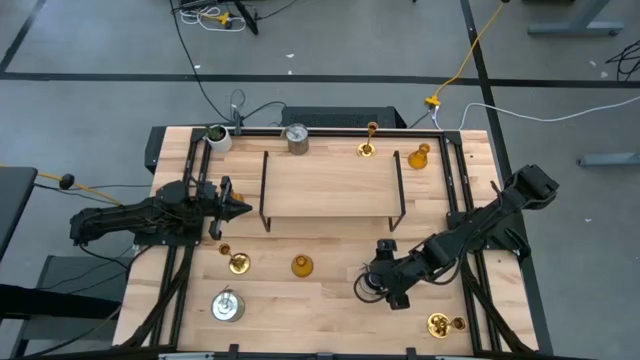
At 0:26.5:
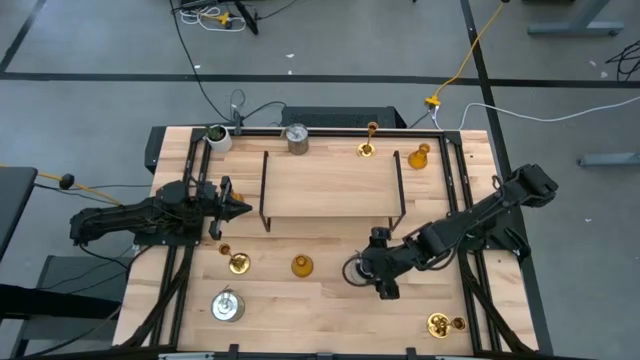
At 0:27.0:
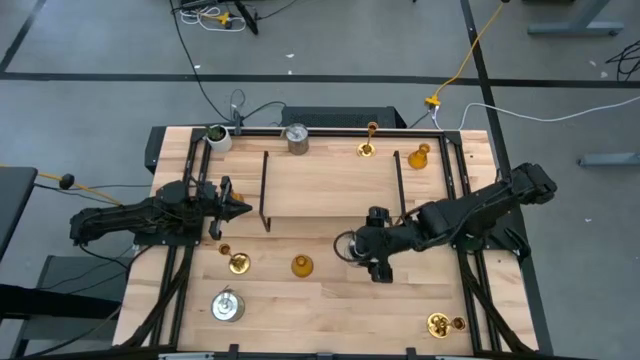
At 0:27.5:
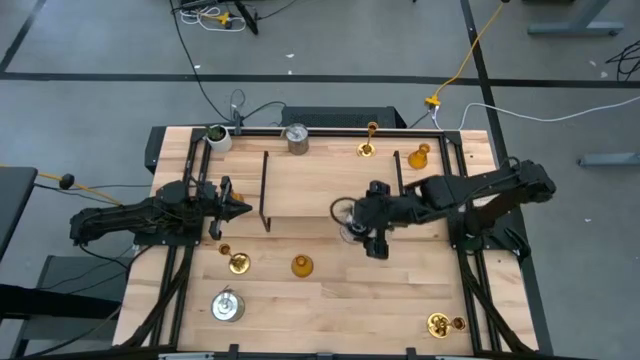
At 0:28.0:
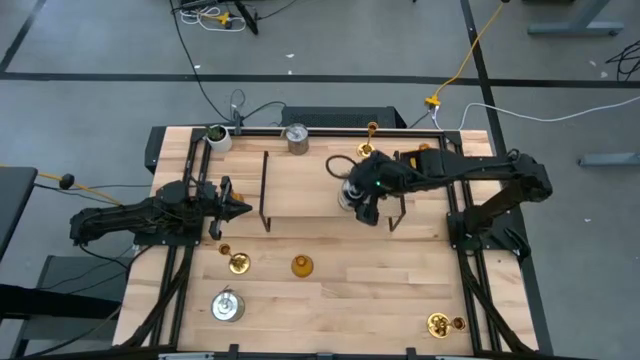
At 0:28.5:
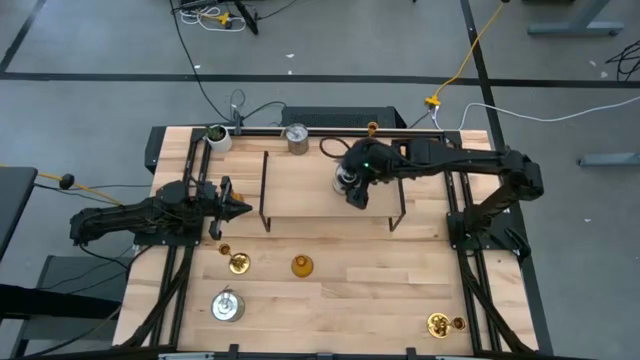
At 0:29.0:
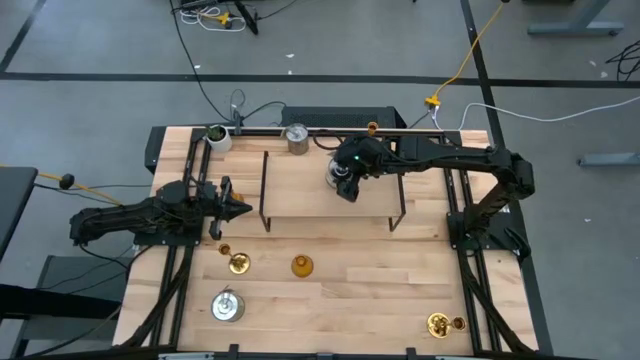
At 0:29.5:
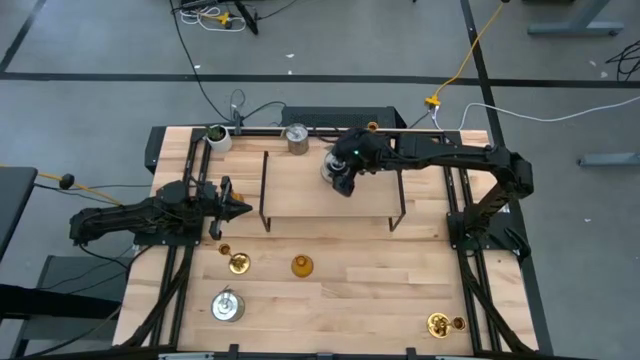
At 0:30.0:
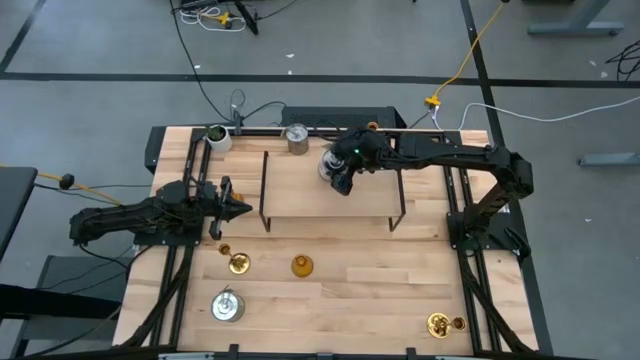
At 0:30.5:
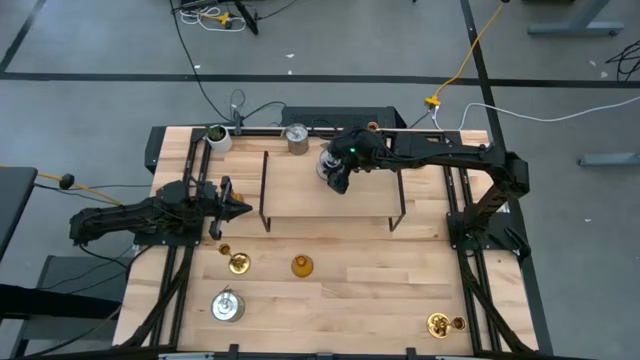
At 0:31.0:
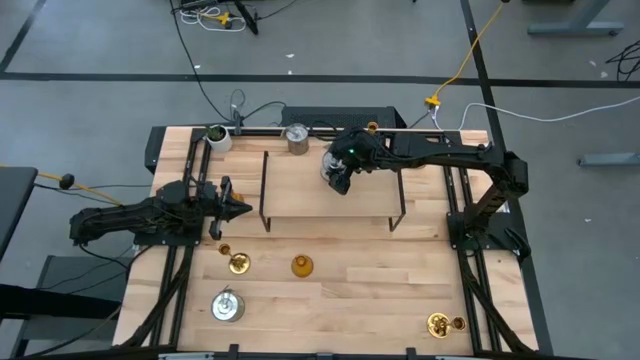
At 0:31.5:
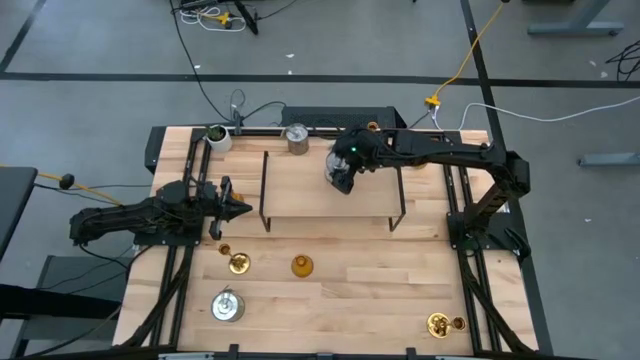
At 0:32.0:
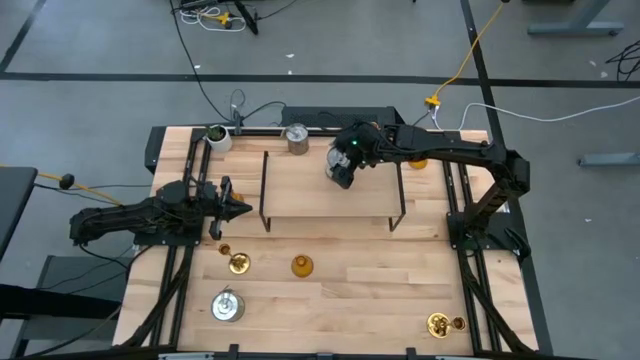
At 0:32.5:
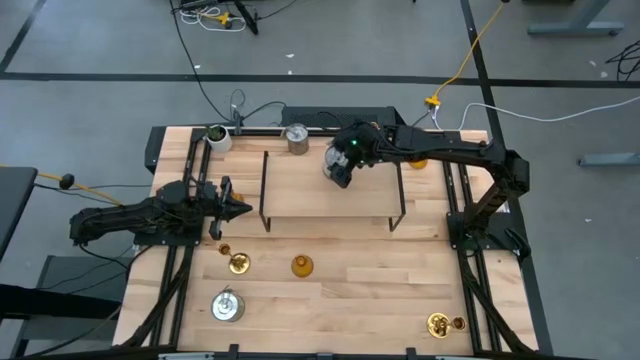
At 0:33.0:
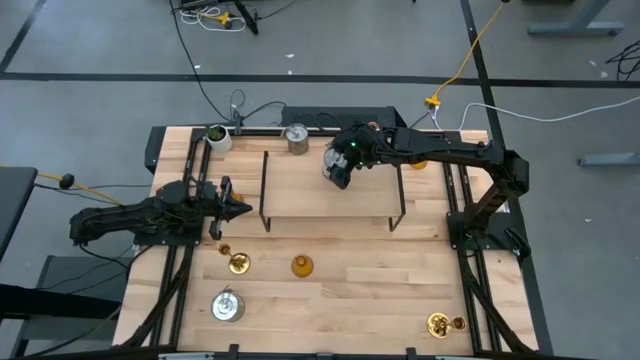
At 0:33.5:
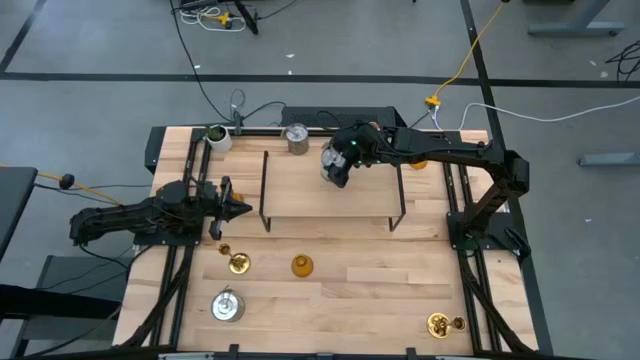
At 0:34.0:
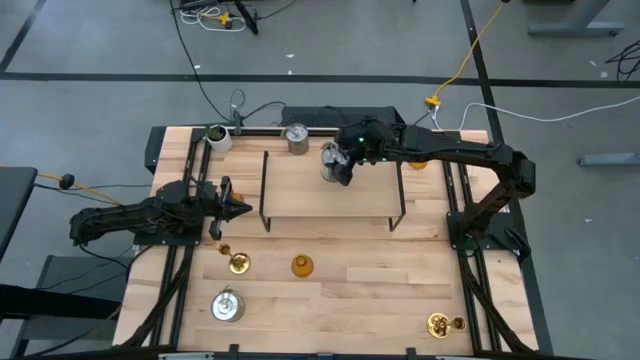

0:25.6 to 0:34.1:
Task: Pick & Place candle stick holders
Put the right scented candle on the shelf

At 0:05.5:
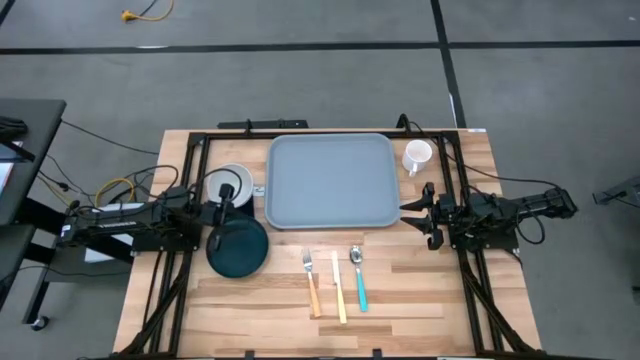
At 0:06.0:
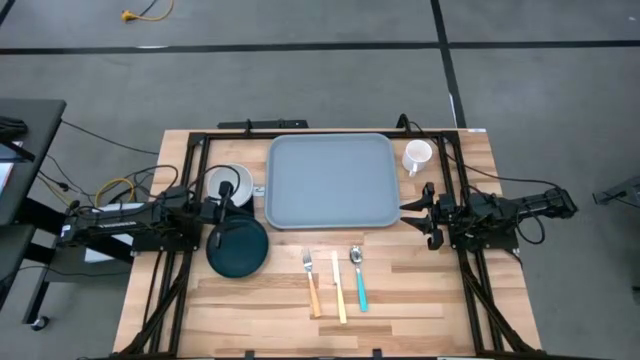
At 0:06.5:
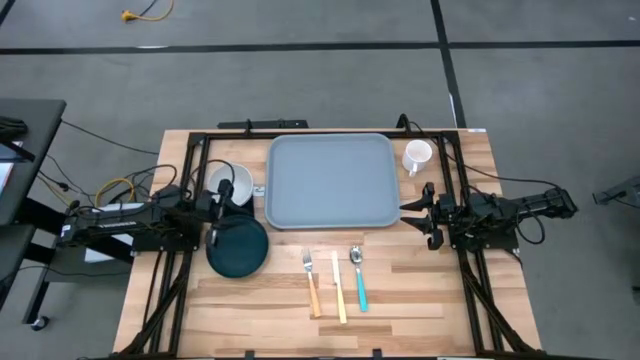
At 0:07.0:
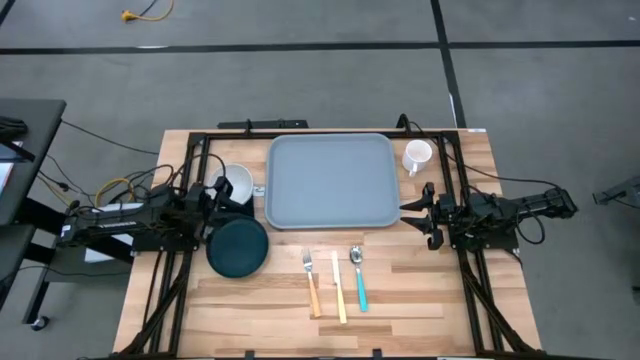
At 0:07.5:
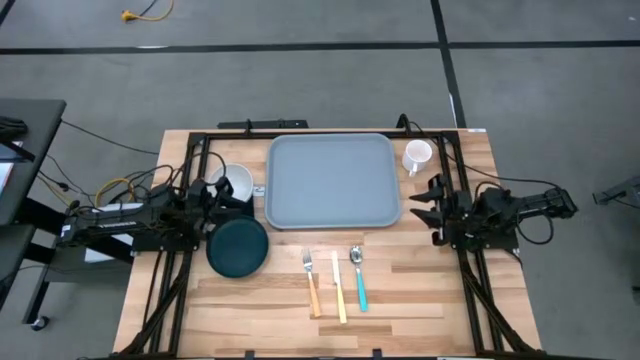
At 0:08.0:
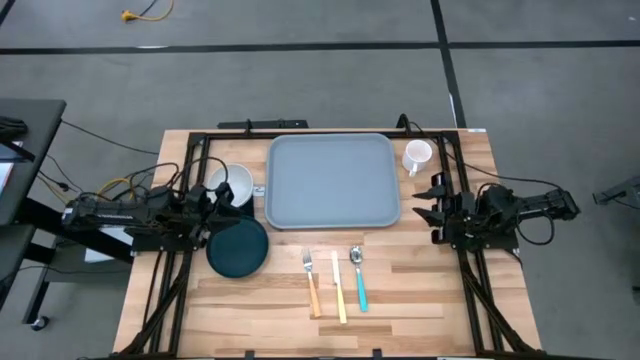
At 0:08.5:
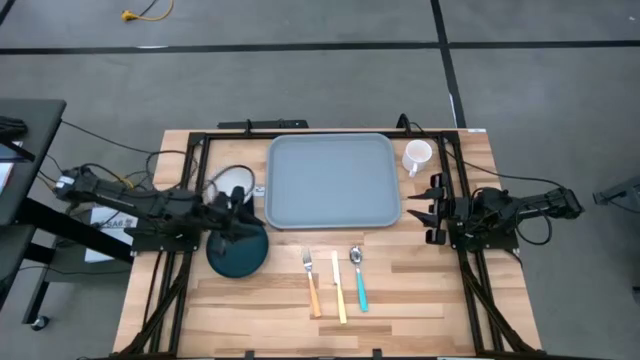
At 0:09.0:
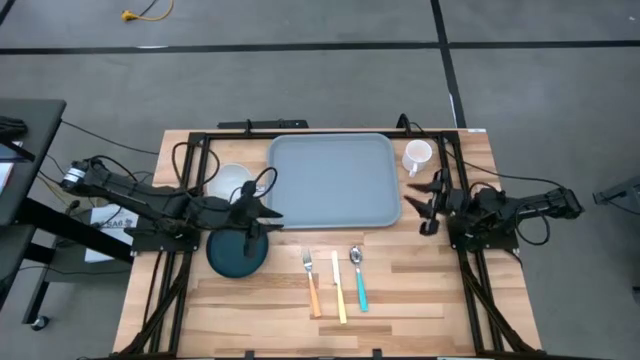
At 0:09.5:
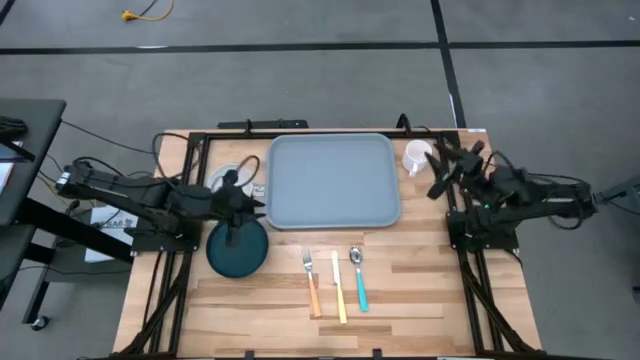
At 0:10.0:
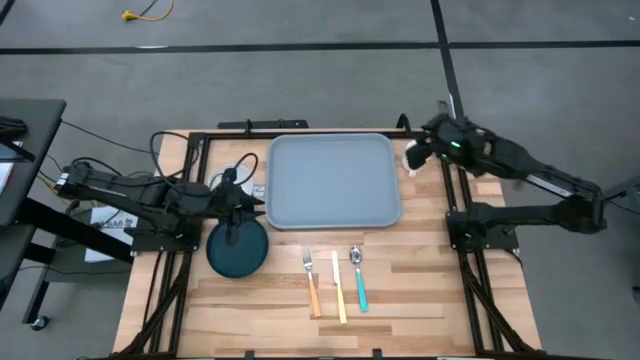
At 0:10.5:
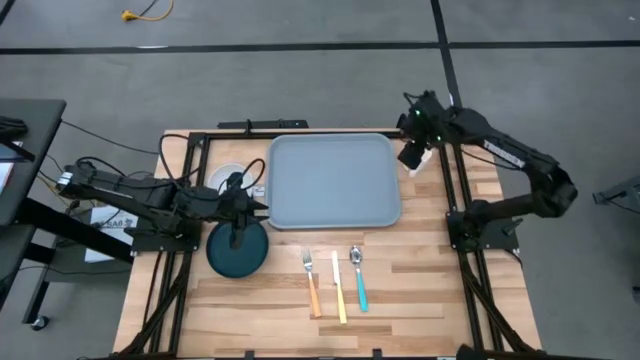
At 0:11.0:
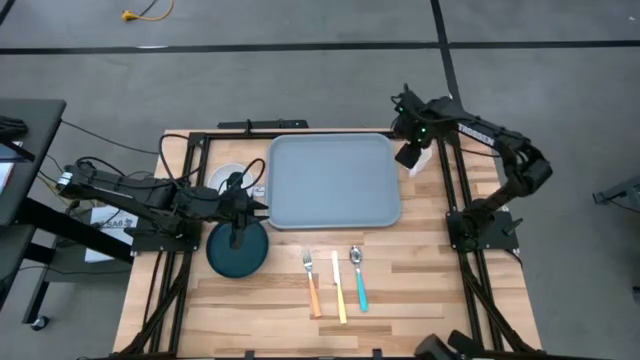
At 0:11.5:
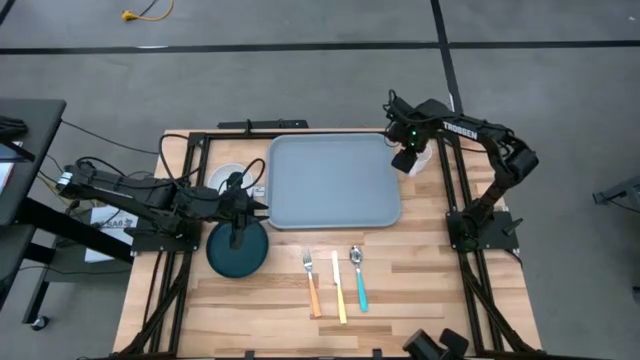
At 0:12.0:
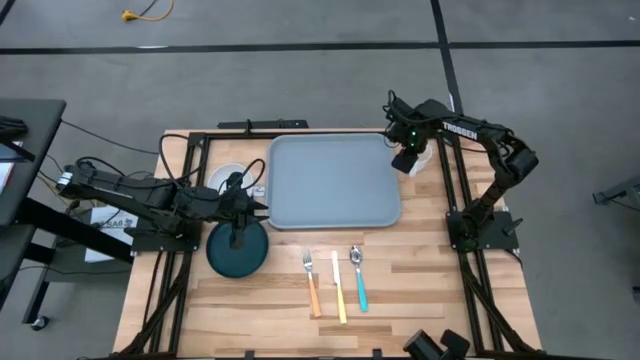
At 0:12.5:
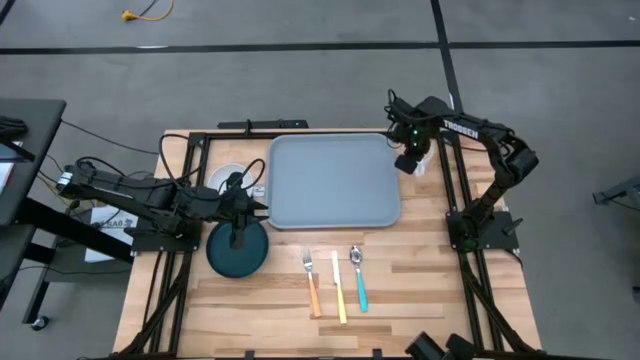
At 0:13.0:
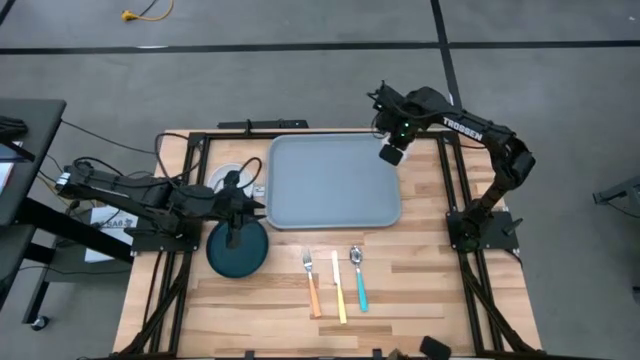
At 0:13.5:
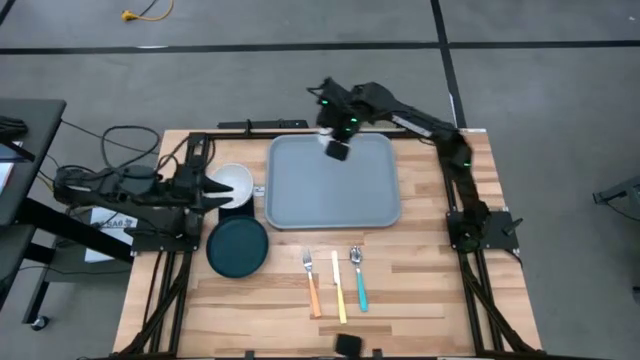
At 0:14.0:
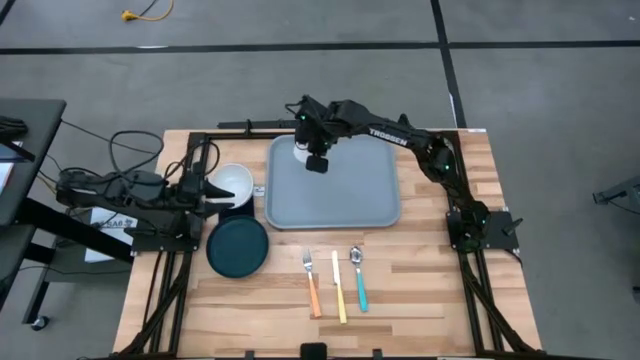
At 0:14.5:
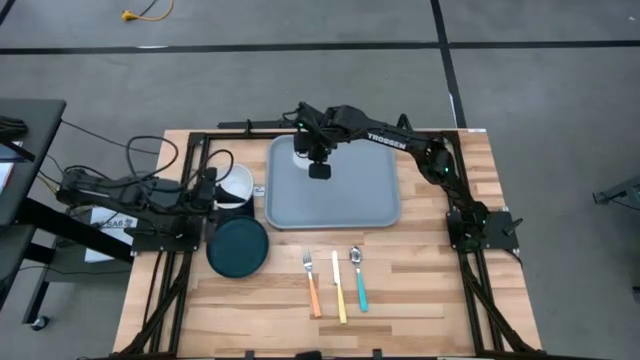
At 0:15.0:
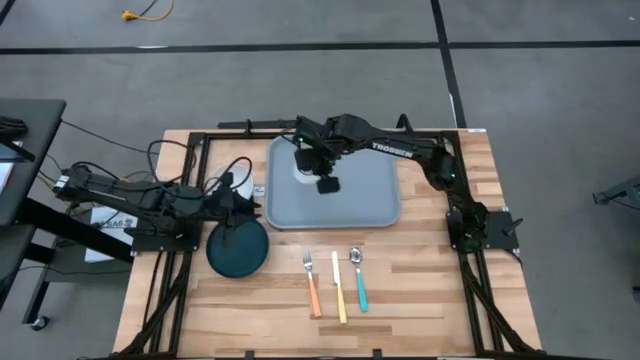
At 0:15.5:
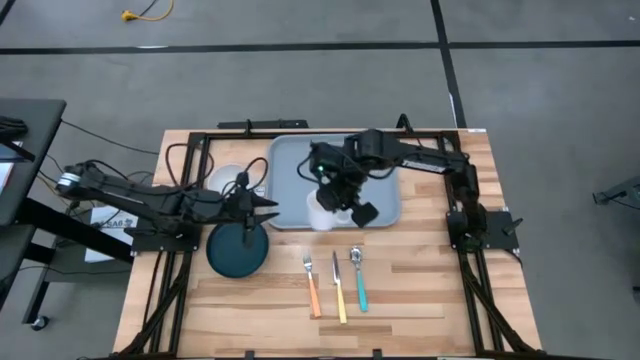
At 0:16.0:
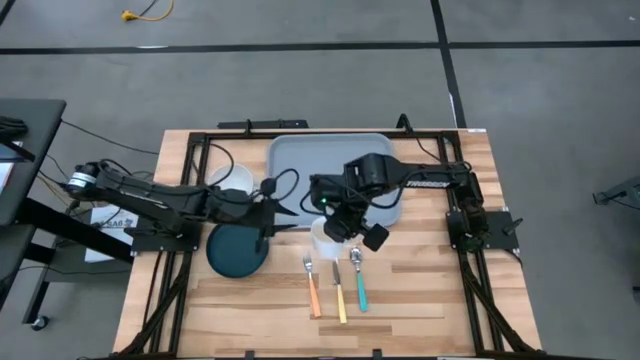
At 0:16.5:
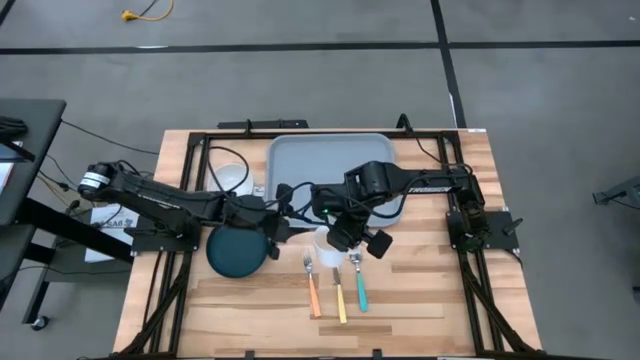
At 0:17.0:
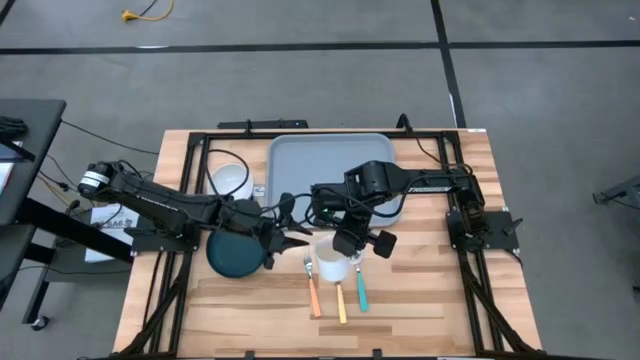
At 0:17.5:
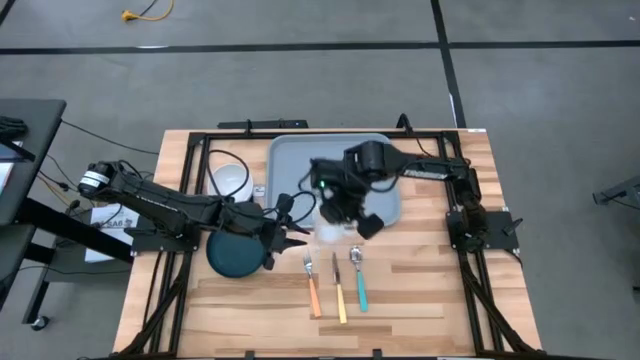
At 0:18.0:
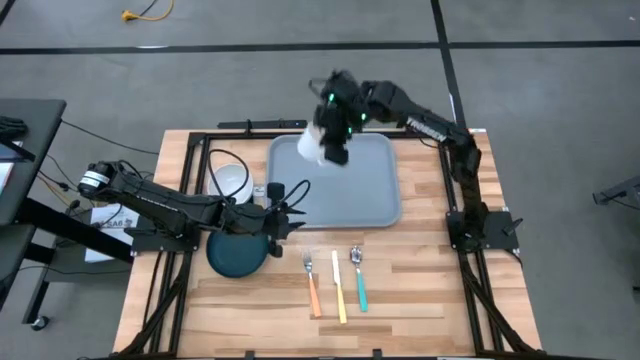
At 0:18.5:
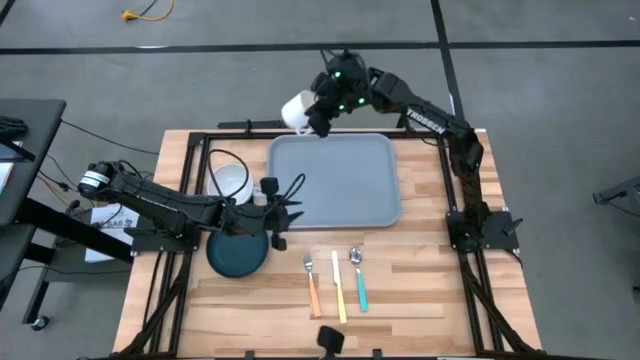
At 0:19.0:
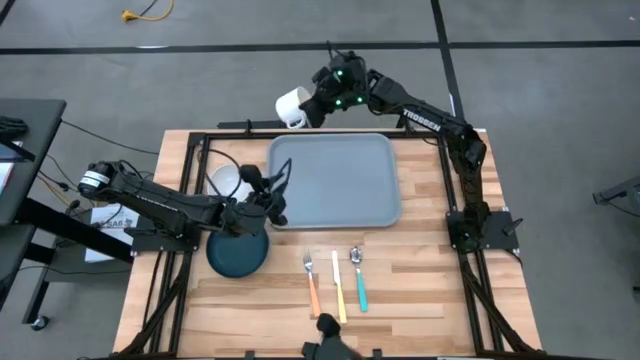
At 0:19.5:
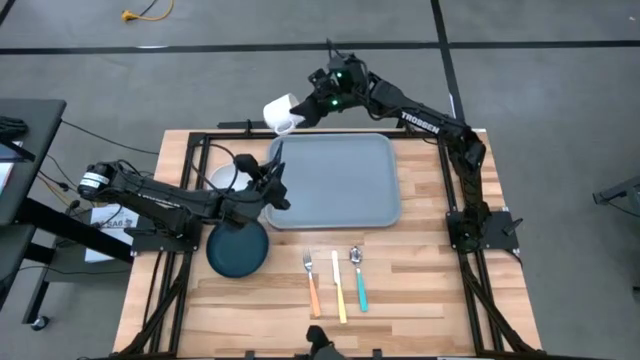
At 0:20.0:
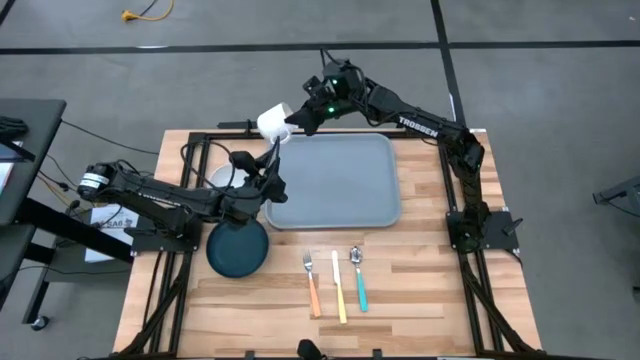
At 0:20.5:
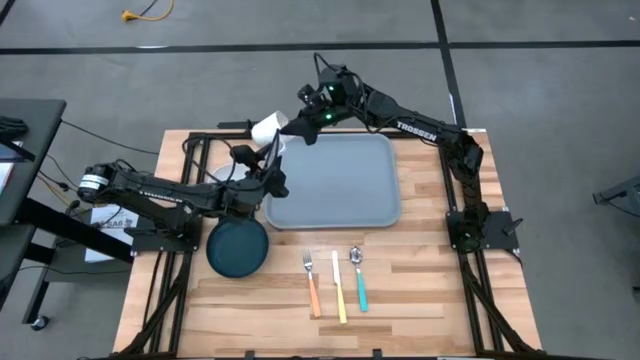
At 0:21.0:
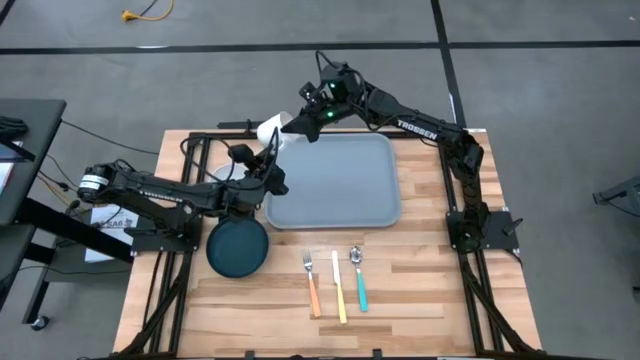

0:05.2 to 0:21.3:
Task: Set up tray
Put the white mug on the top left of the blue tray
